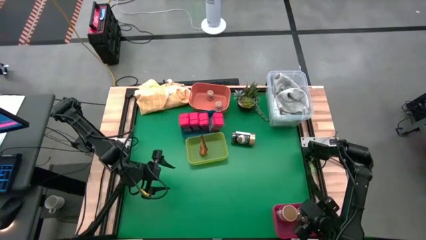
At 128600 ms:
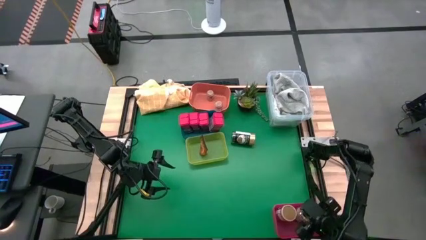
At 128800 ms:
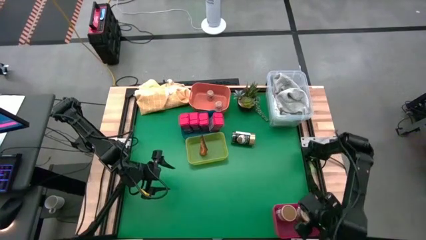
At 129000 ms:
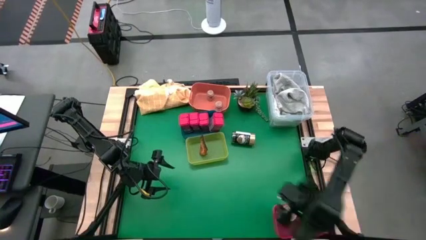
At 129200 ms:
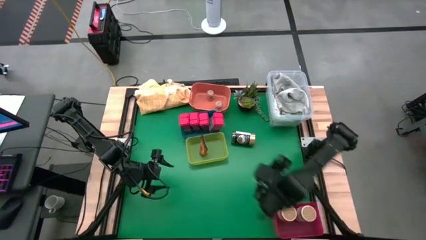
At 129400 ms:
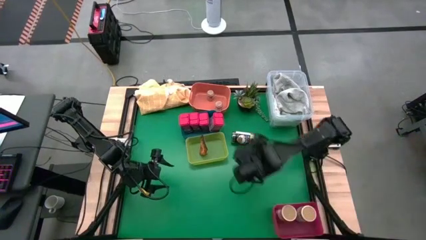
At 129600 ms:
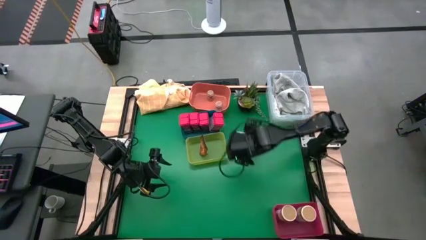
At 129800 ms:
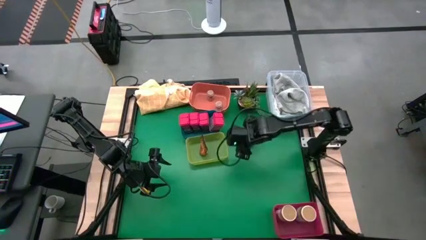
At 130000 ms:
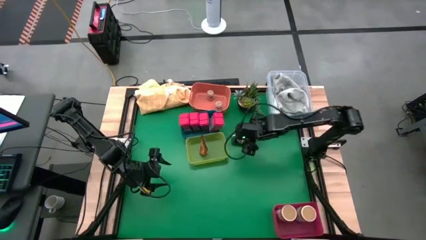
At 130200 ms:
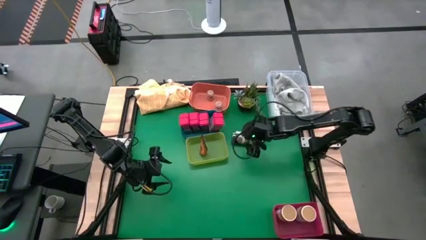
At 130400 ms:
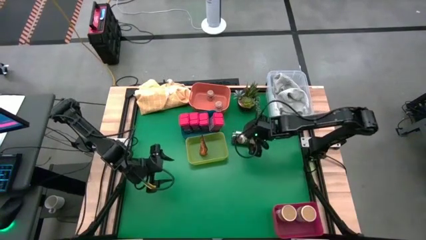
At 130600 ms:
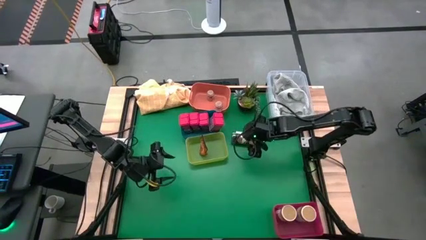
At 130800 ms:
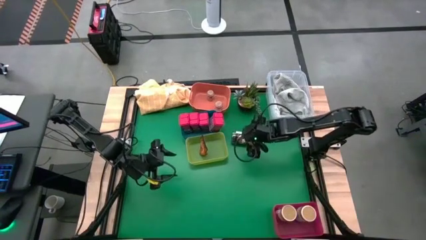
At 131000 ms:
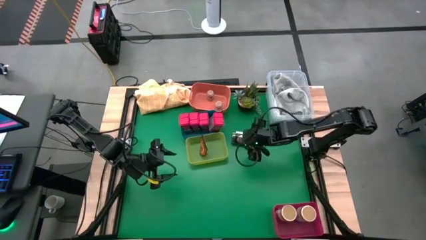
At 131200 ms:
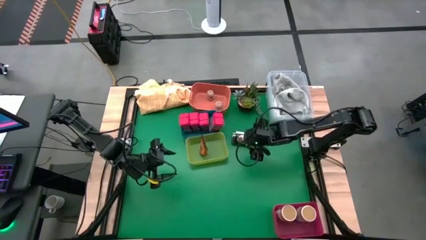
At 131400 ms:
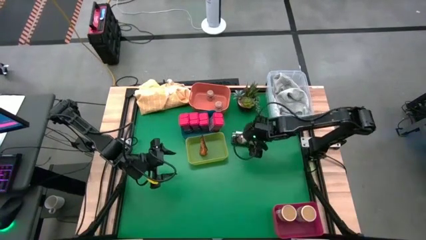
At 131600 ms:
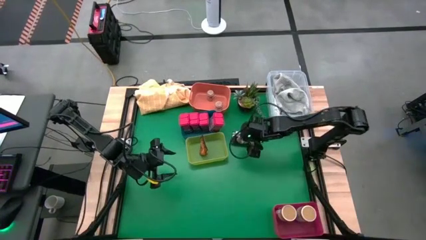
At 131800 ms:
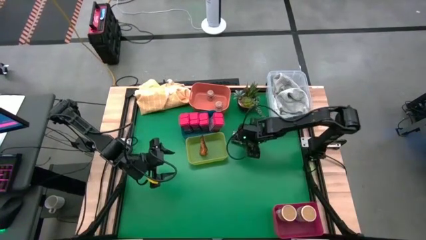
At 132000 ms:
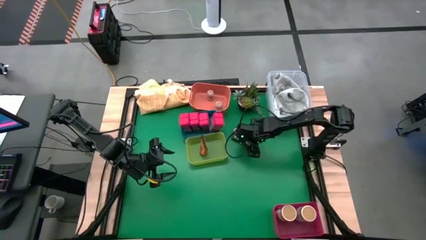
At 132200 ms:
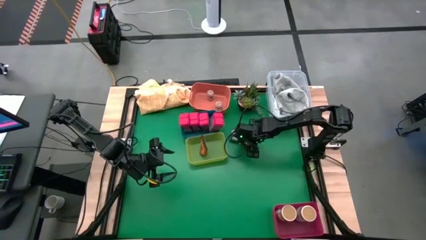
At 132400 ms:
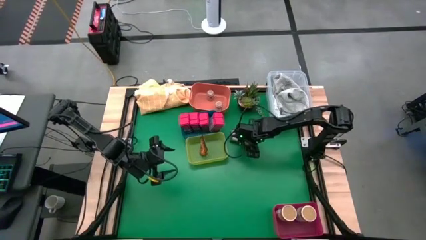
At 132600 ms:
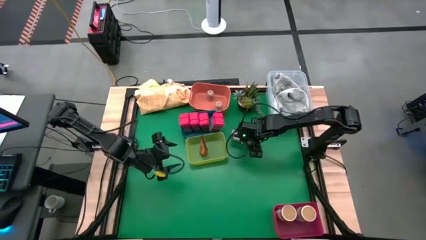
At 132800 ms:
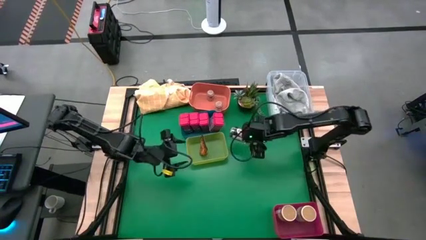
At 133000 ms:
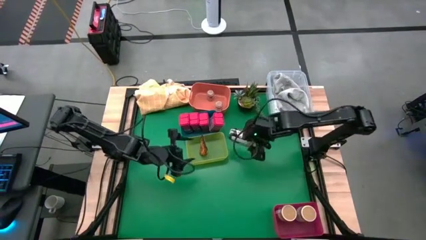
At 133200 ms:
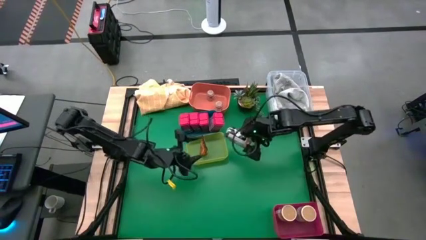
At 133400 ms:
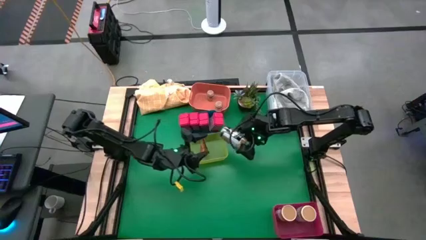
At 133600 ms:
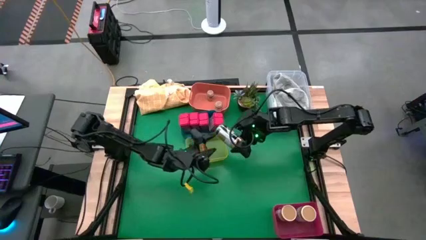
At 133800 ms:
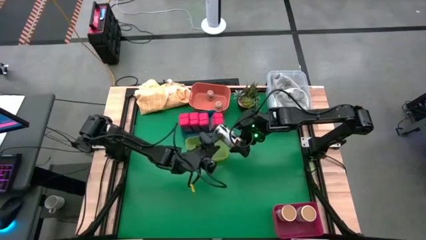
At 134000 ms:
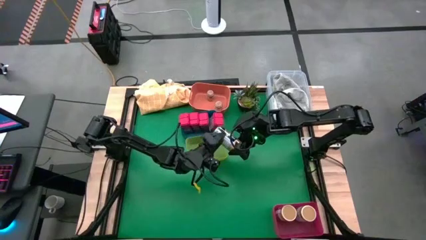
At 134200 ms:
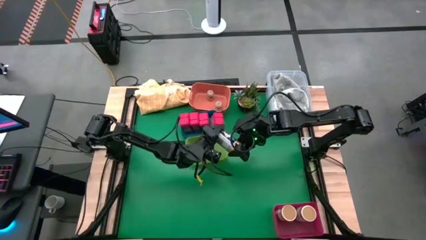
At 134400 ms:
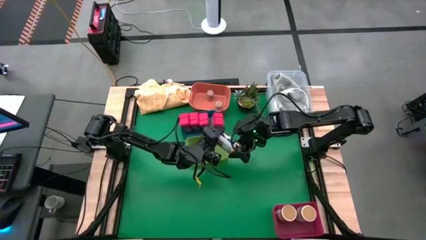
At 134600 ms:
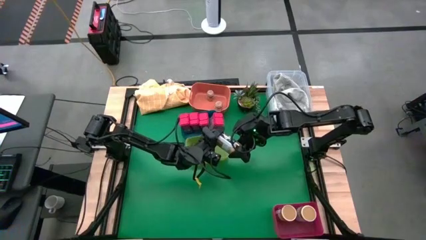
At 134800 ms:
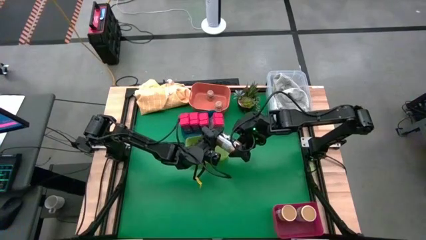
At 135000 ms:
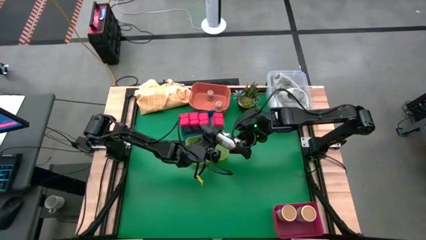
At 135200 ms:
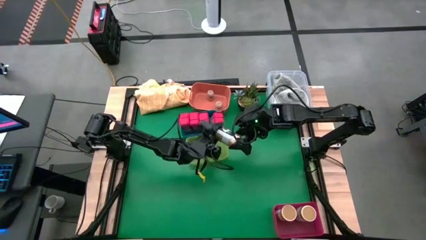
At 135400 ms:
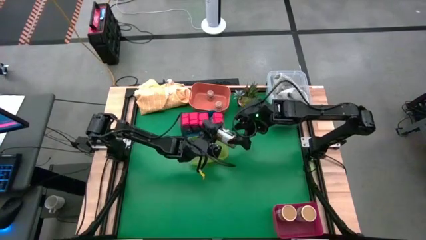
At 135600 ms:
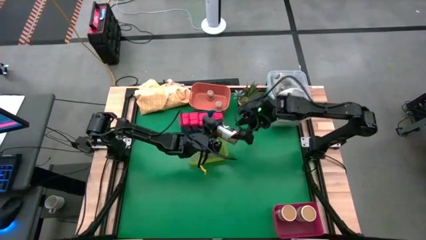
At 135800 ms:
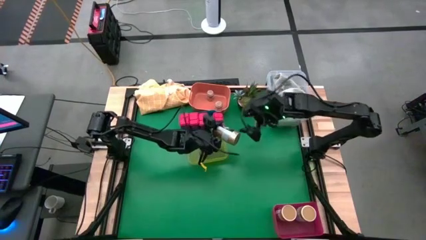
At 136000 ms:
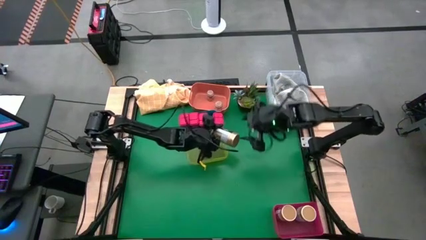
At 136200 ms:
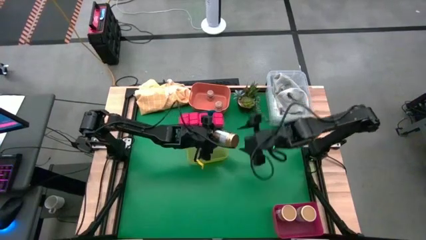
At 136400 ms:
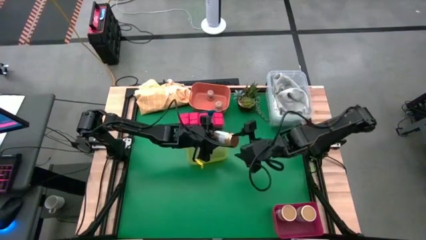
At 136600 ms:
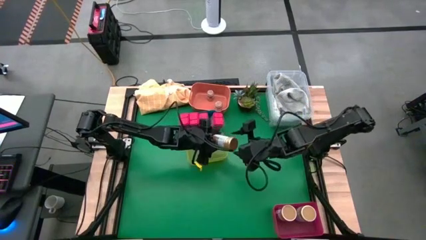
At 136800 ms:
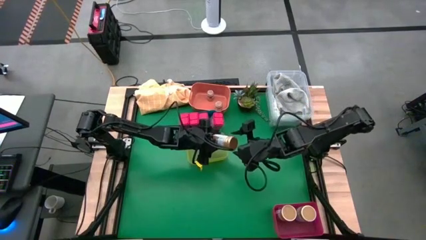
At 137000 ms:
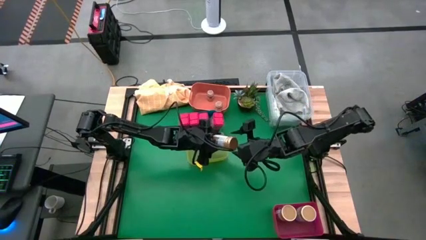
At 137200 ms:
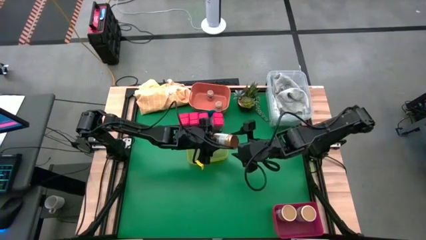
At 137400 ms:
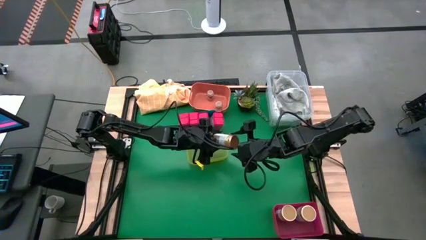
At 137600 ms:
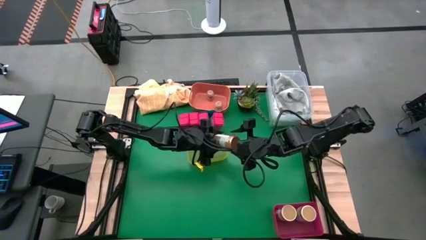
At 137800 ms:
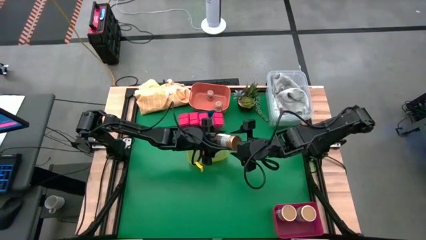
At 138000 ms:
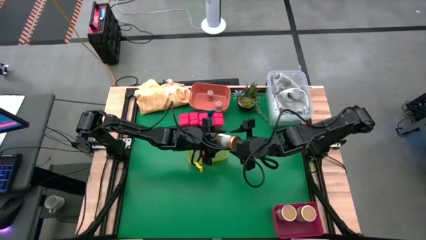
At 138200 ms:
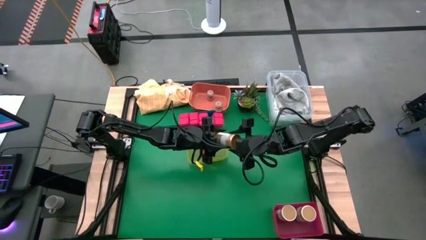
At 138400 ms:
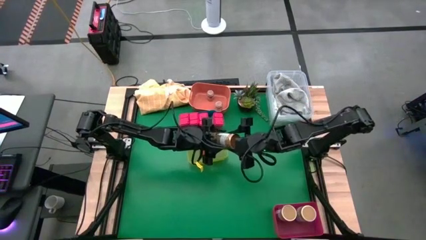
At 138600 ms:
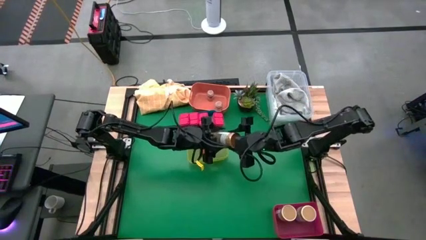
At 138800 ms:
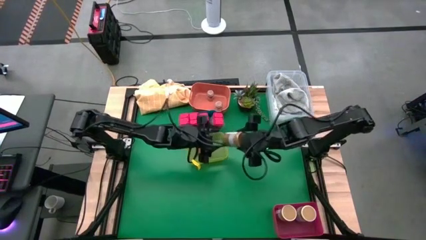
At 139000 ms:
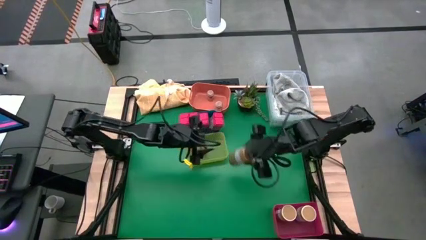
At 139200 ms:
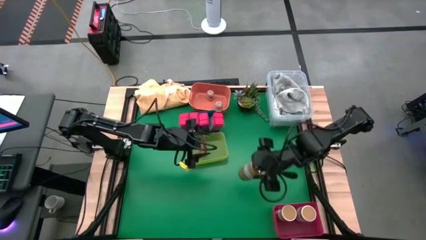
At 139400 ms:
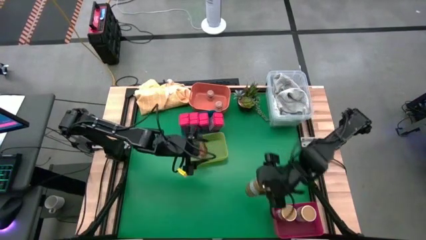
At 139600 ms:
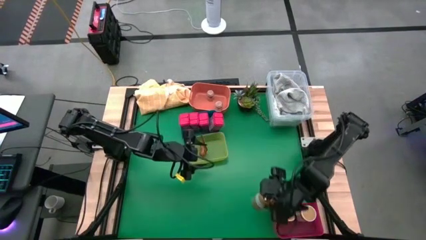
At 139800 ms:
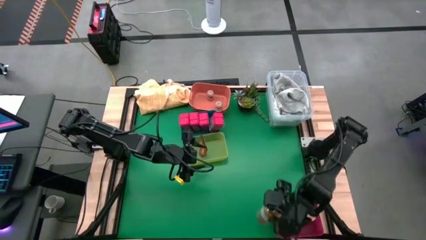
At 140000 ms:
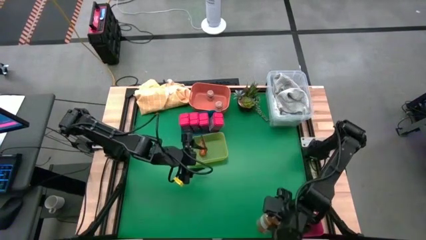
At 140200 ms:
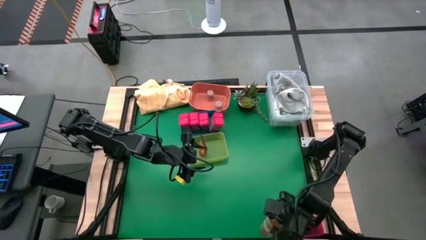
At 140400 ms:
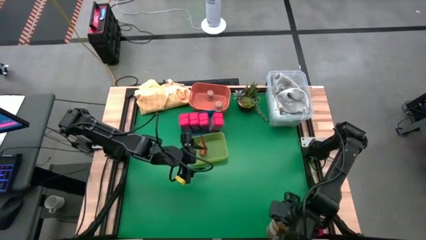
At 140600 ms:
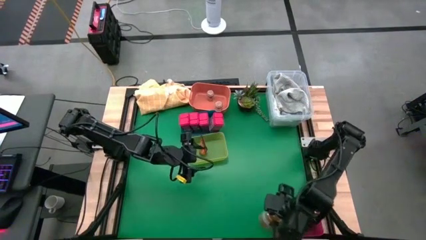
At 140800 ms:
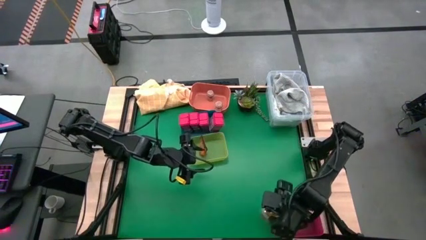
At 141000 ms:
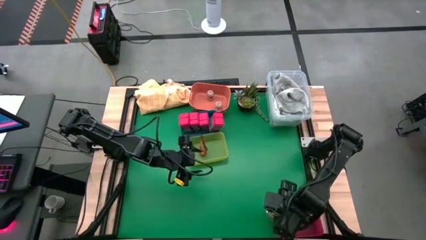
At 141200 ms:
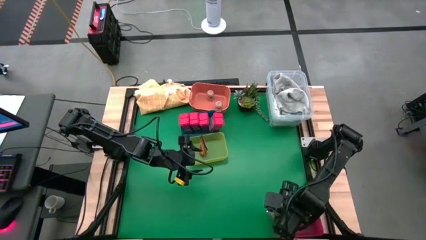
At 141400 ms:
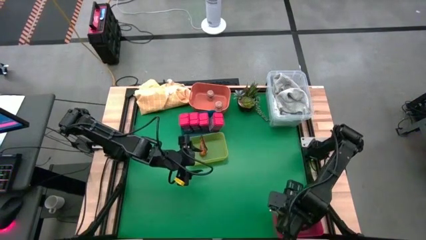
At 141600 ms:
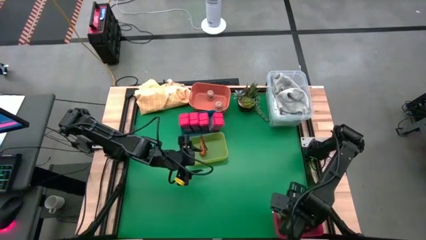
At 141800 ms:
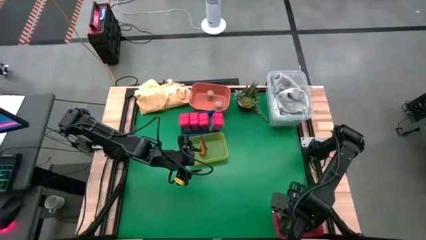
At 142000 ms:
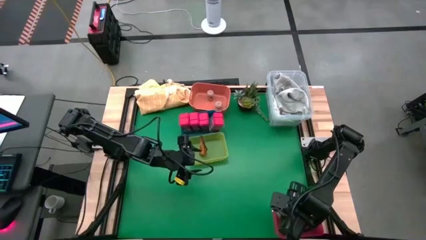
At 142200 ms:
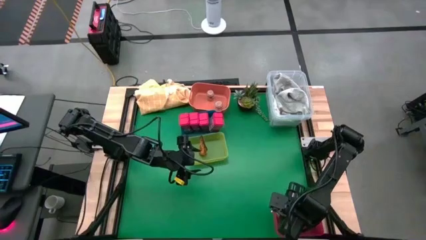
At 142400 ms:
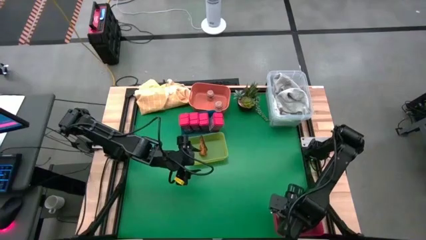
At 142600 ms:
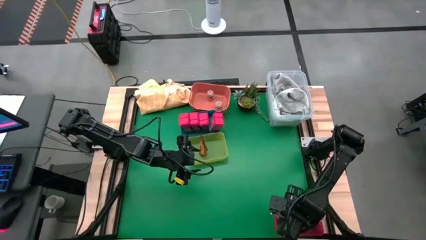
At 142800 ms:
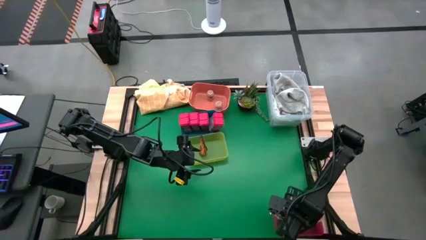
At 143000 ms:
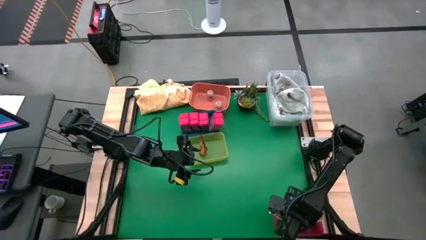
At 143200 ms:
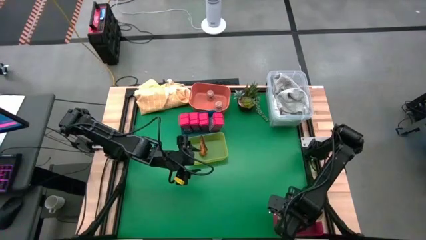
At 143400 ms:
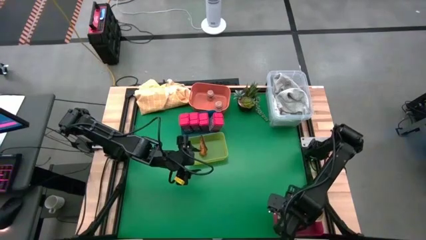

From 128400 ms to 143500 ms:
Task: Sort spices by type
Put the gold seasoning can into the pink bin
